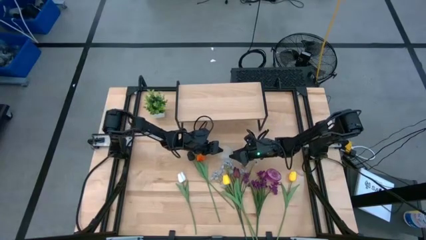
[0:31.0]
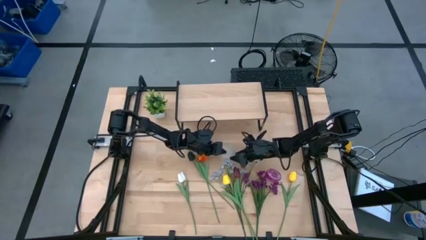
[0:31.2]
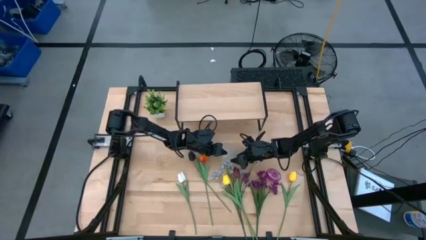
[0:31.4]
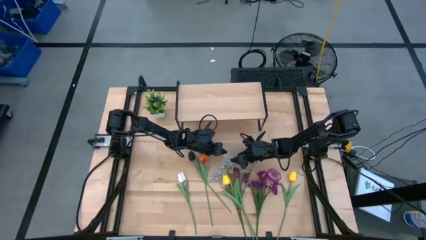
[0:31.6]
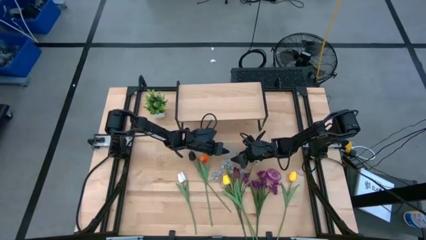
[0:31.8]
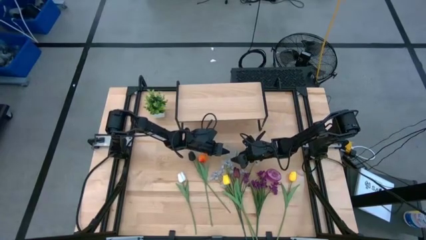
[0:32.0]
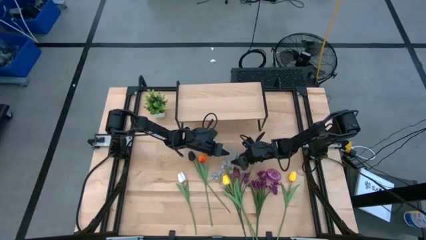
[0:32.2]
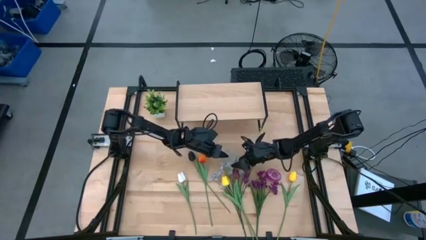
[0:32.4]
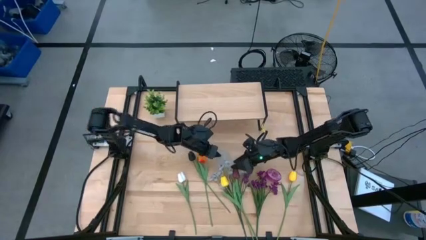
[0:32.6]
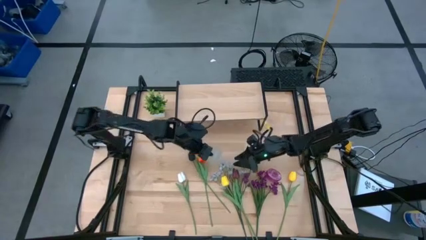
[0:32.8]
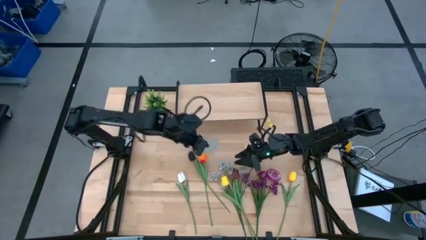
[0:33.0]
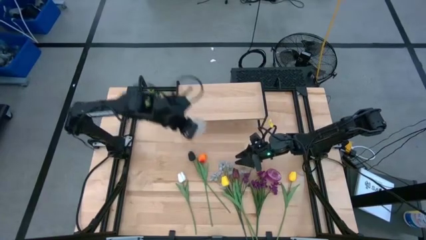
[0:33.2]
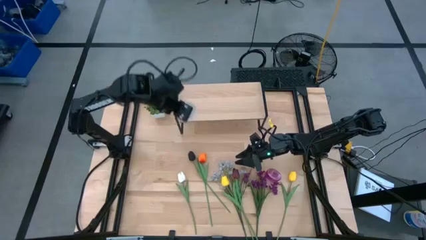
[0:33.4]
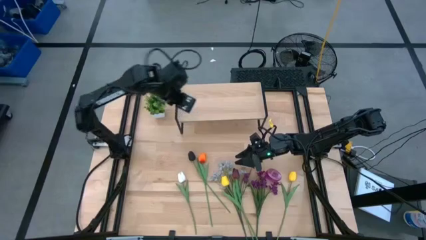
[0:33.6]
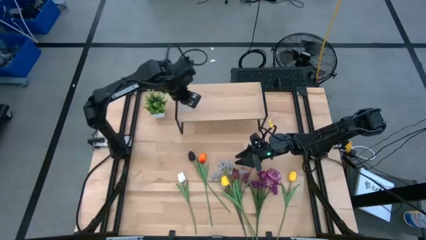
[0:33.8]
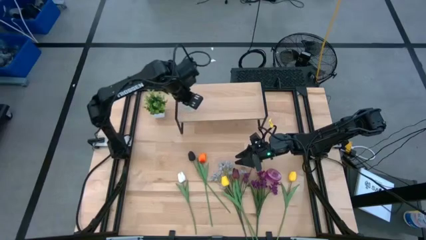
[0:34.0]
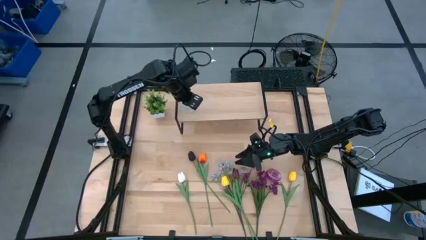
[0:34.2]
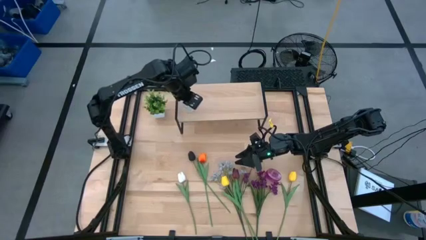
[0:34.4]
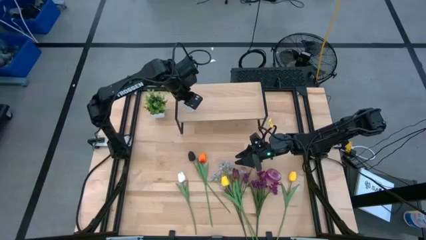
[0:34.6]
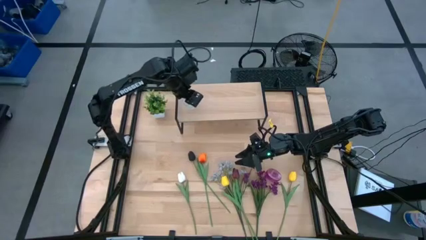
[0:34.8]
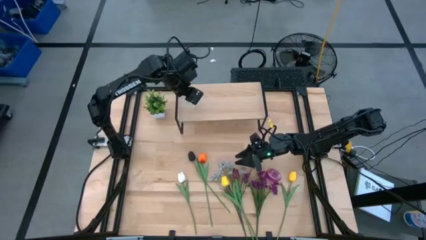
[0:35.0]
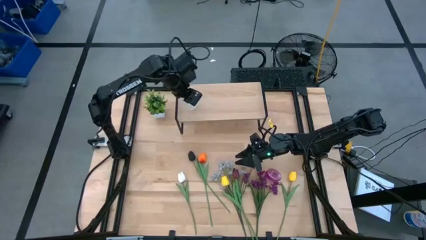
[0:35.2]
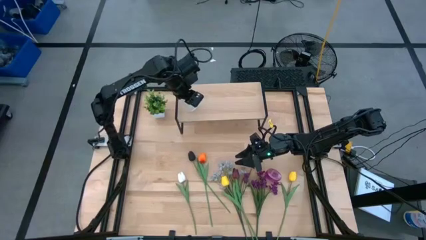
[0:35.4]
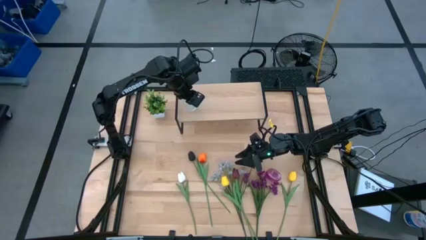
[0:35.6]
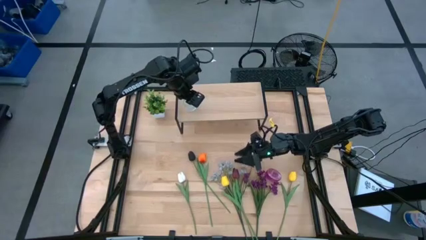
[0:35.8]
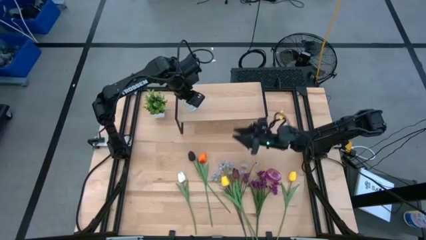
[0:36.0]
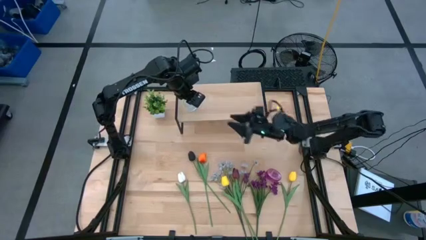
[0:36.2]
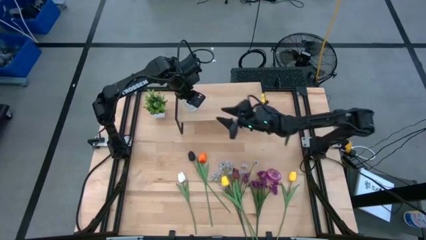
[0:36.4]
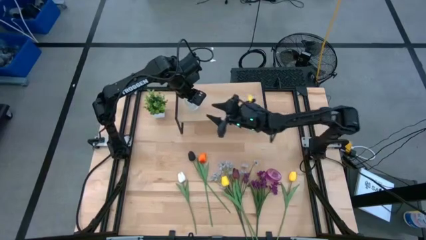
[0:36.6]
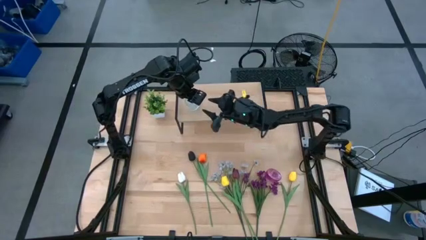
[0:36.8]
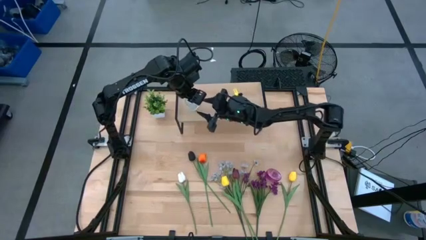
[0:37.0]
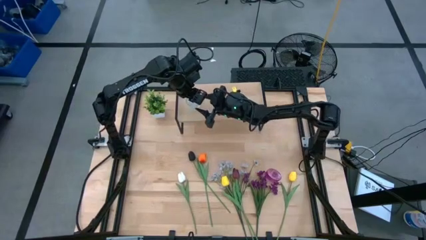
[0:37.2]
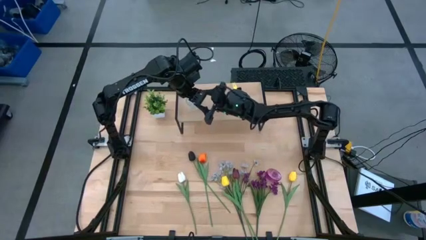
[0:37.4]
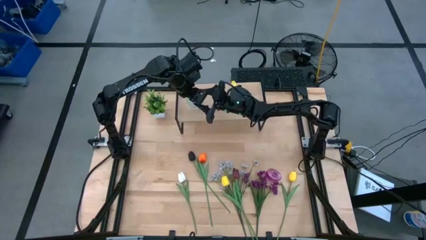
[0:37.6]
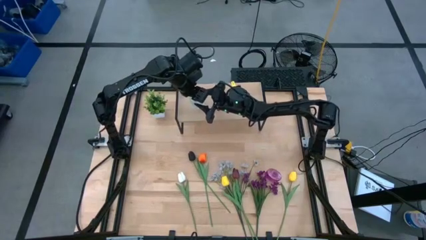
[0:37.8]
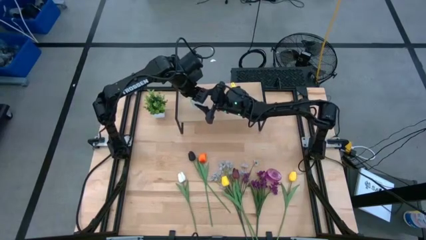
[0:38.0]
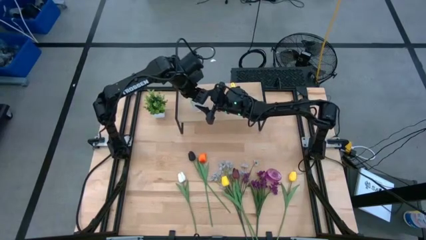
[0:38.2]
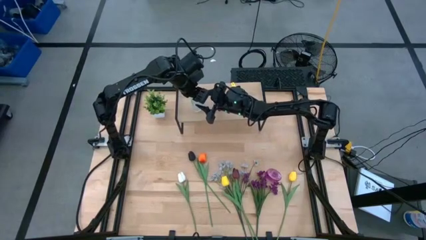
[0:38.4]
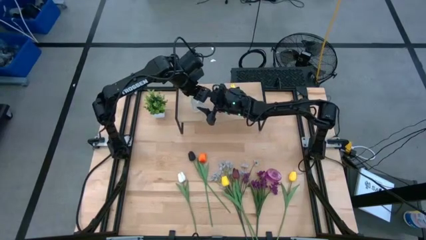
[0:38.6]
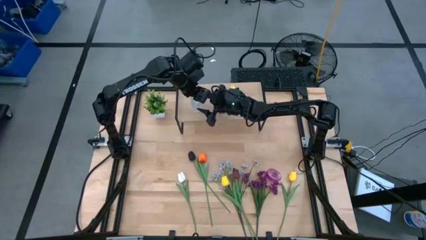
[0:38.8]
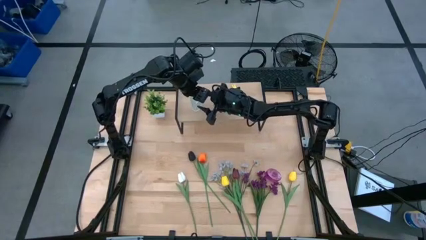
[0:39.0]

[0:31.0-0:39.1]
Task: Pick and place flowers into a vace then onto a shelf
Put the white vase on the shelf

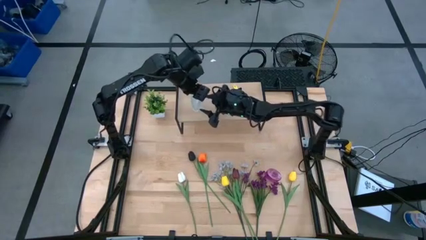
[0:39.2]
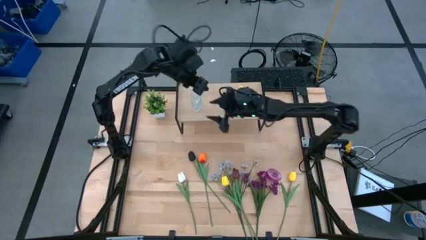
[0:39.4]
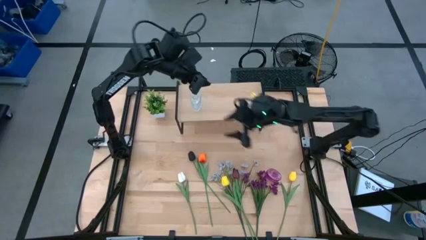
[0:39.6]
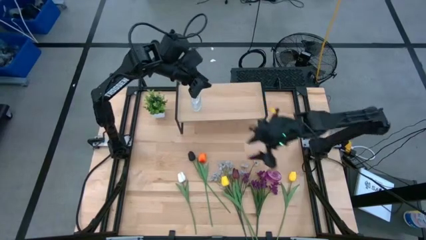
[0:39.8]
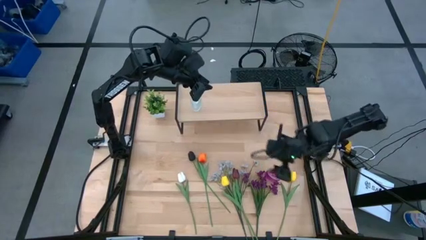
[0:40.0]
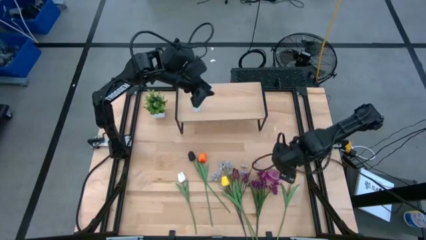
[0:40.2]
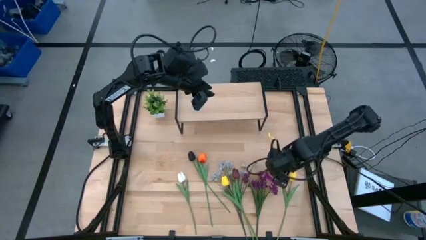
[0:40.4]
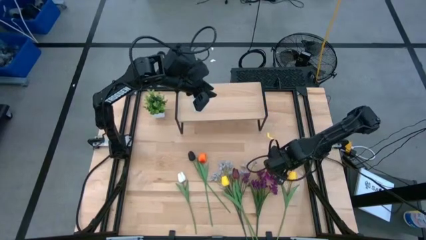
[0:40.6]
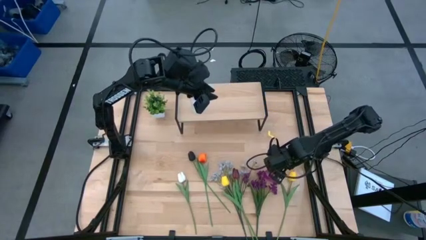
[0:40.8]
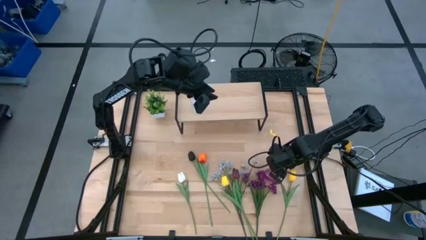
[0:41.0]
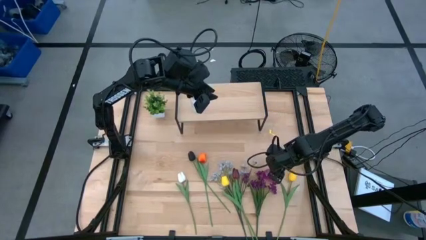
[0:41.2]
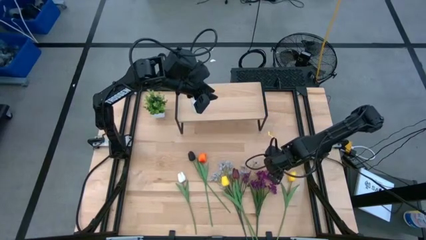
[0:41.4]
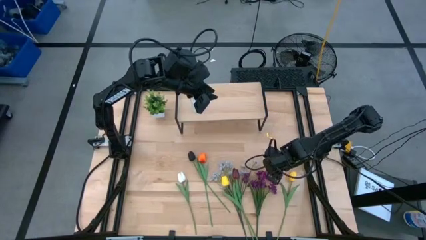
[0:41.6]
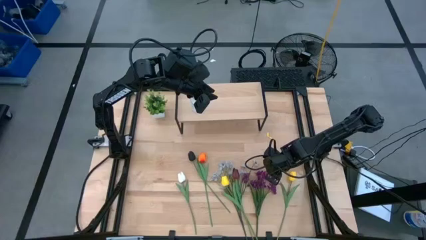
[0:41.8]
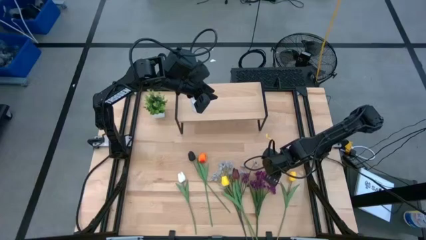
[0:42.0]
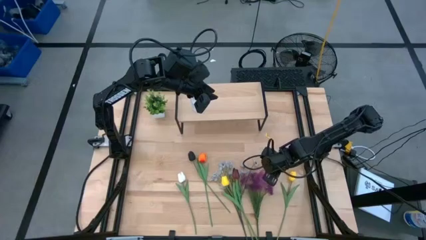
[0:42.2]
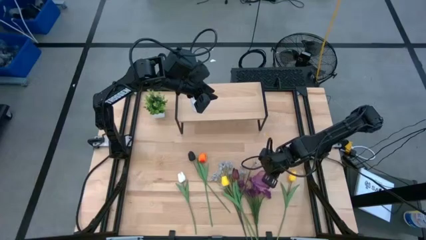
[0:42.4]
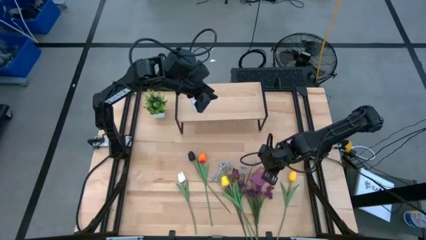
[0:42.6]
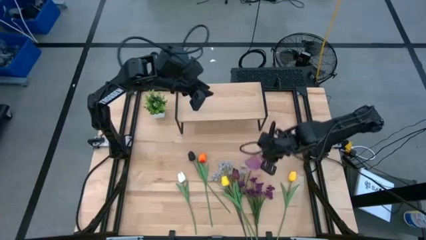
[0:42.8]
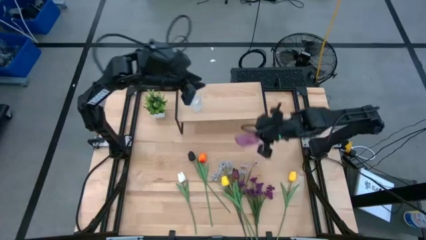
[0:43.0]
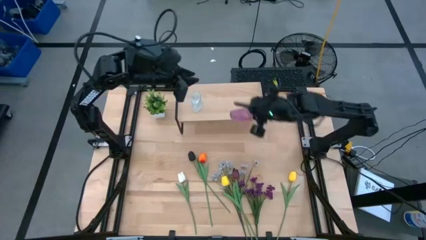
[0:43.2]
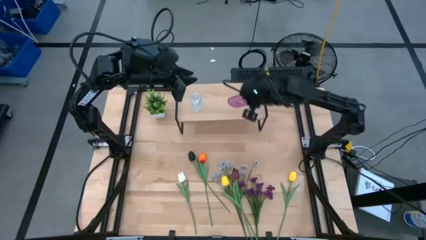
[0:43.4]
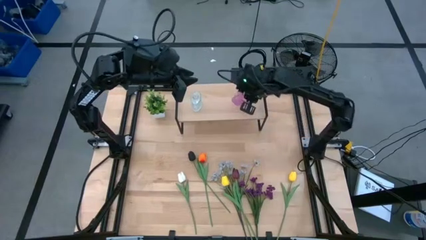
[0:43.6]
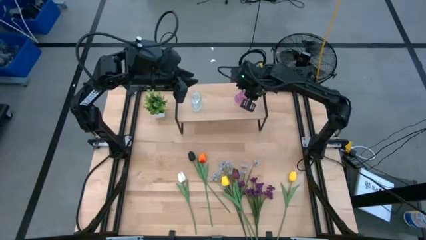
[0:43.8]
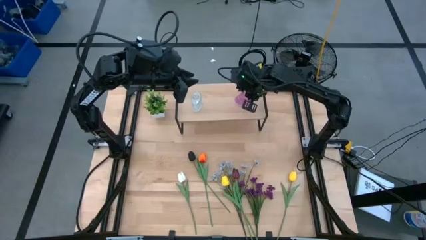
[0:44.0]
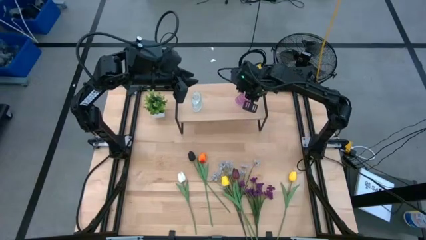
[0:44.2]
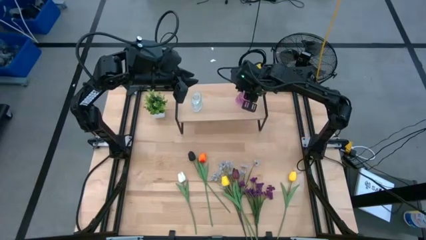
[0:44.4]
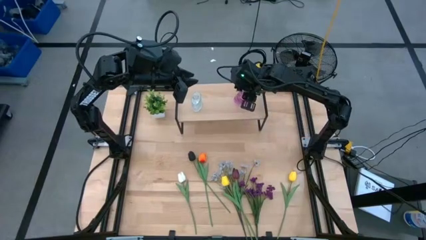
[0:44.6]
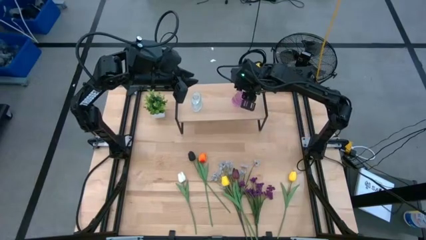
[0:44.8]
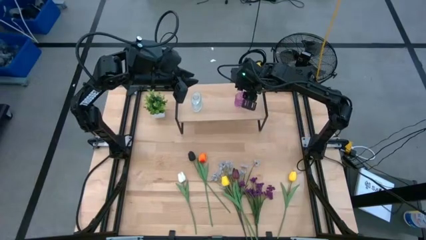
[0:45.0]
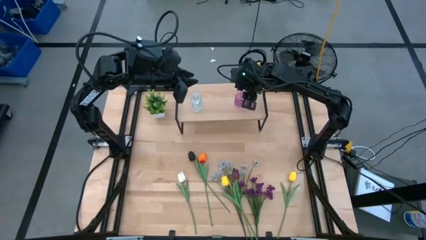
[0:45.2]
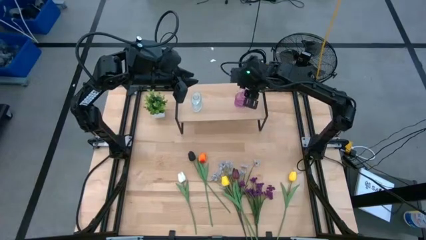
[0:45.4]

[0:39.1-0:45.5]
Put the purple vase on the shelf
